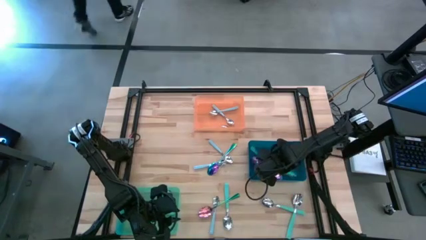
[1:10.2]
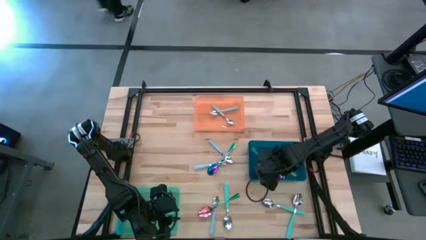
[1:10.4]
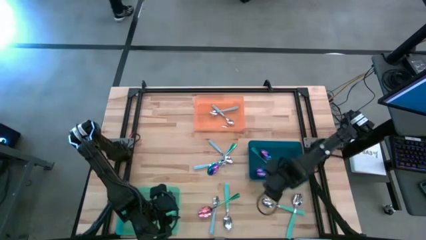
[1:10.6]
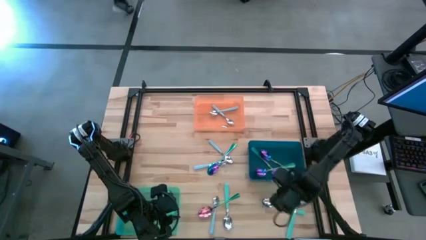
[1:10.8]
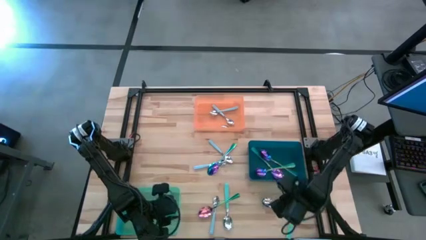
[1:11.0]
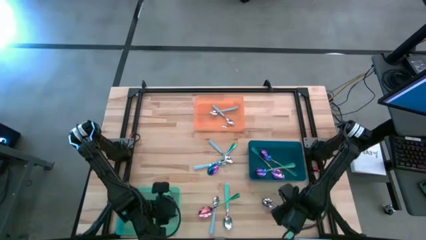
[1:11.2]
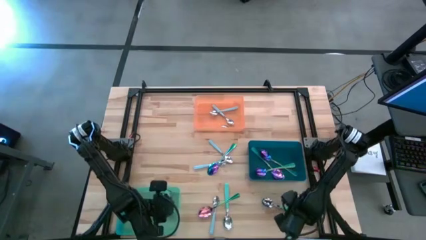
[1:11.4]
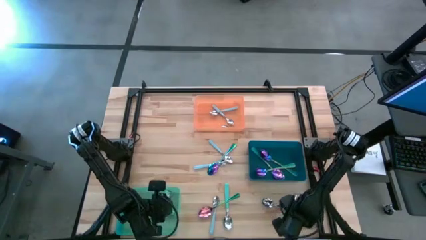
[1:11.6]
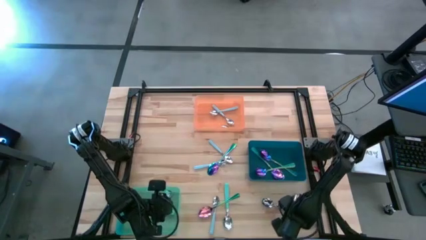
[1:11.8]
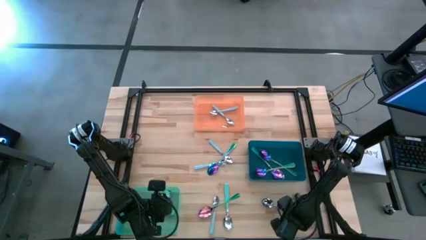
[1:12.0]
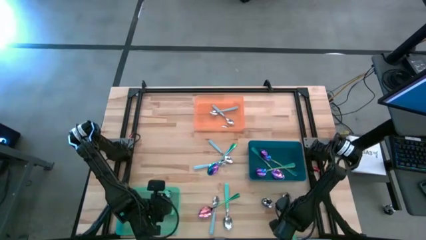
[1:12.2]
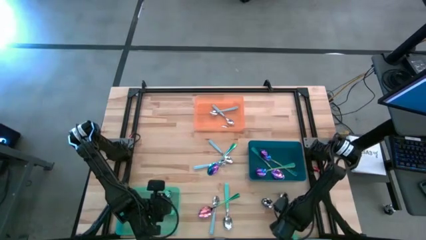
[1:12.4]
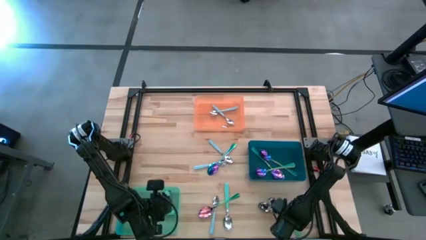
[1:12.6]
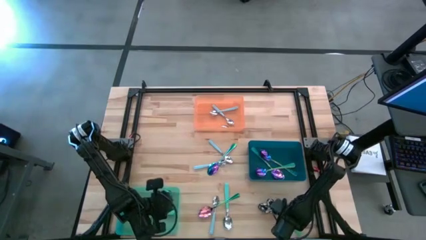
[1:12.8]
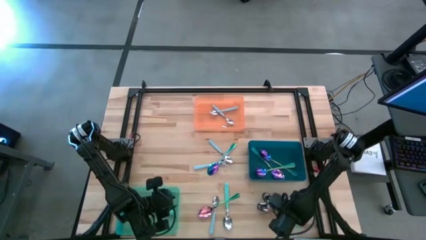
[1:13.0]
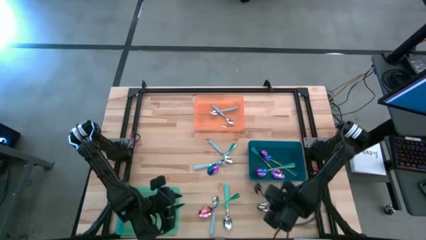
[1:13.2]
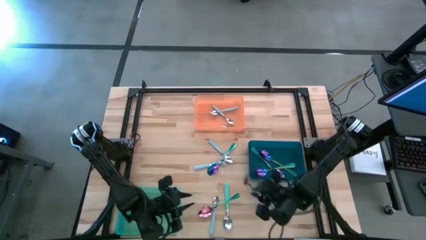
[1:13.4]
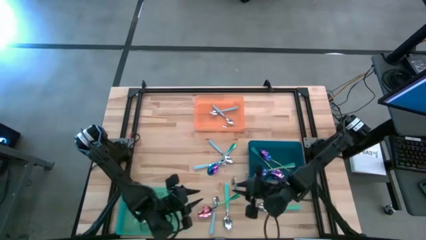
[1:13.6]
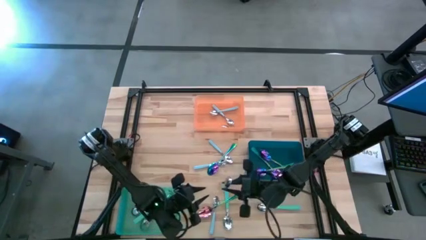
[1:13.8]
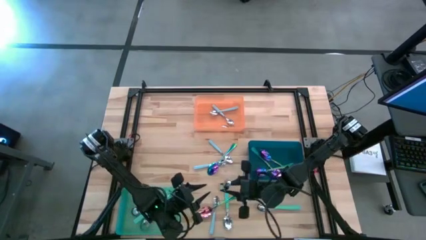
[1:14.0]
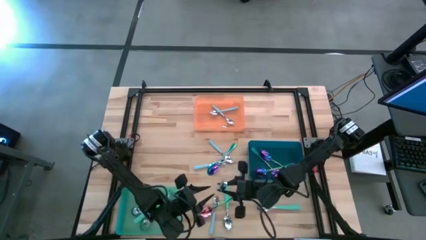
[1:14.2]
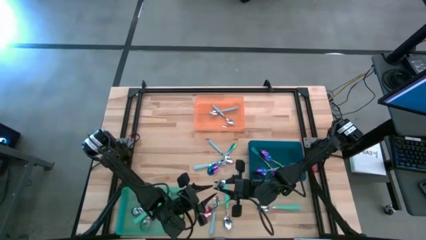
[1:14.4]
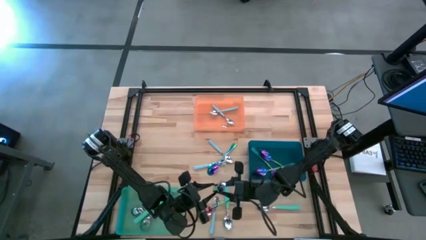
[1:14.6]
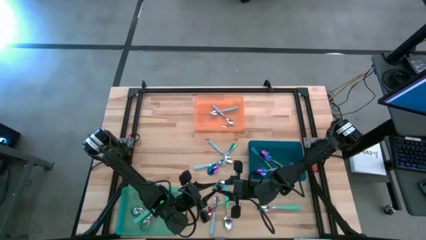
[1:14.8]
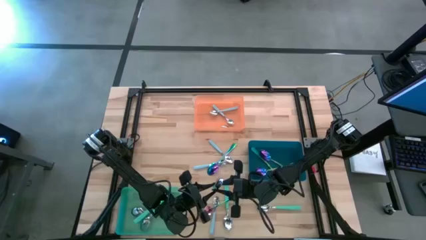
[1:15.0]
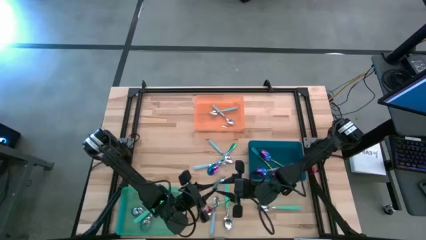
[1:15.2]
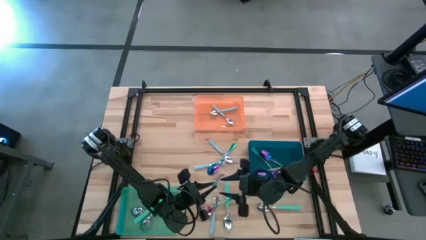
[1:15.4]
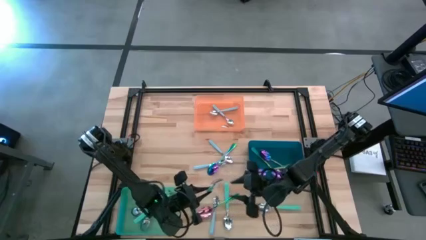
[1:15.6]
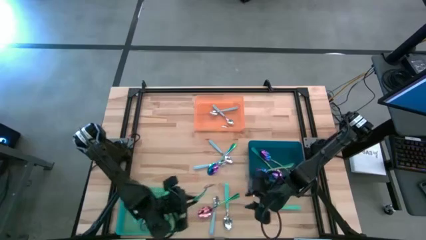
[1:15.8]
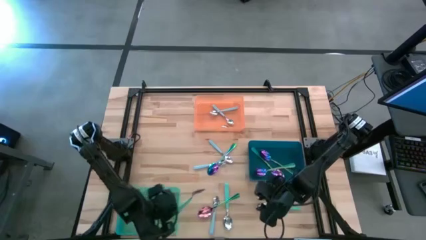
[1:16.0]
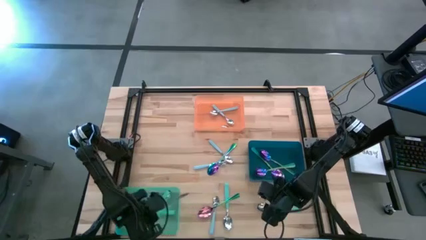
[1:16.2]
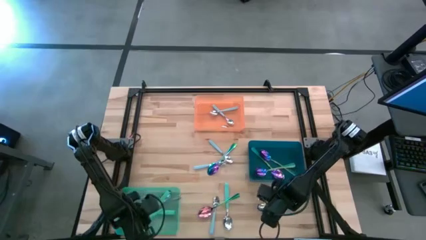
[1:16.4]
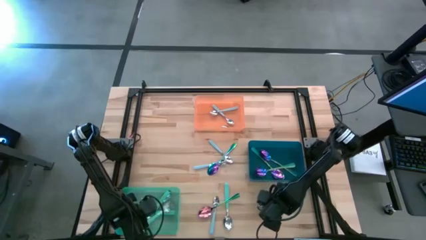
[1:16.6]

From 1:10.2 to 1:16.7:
Task: Sort silverware by color (type)
Put the green spoon into the green bin

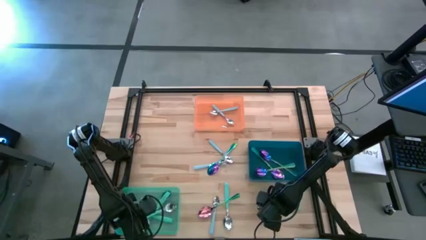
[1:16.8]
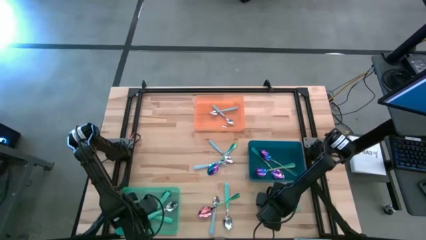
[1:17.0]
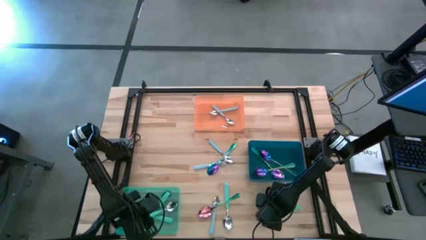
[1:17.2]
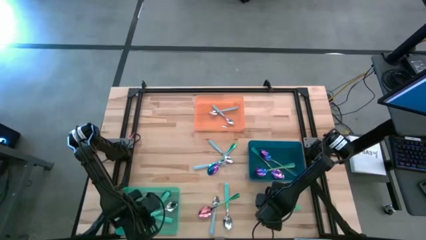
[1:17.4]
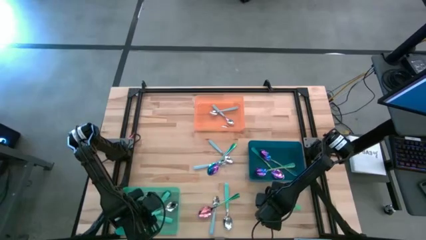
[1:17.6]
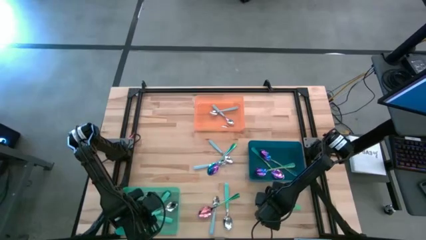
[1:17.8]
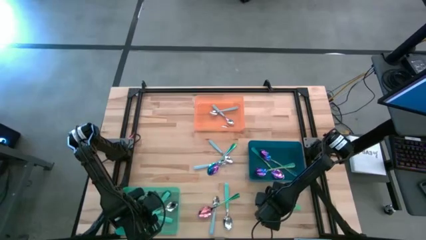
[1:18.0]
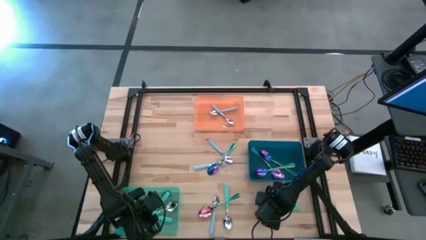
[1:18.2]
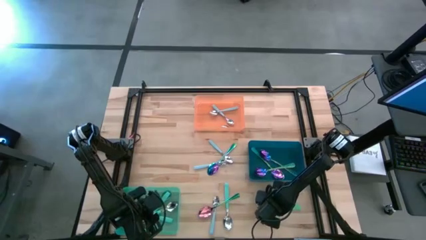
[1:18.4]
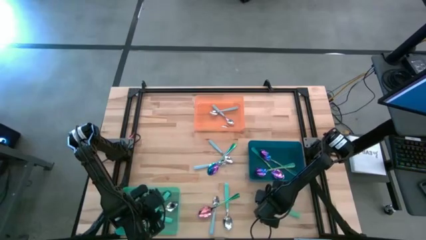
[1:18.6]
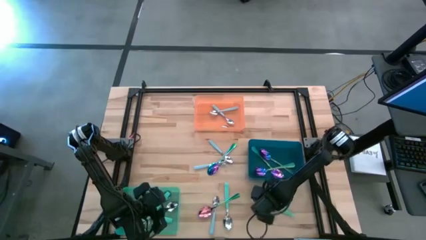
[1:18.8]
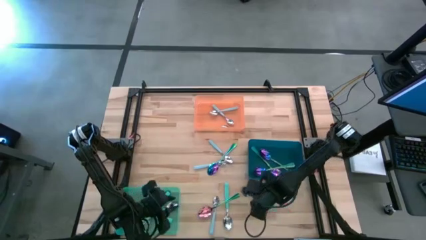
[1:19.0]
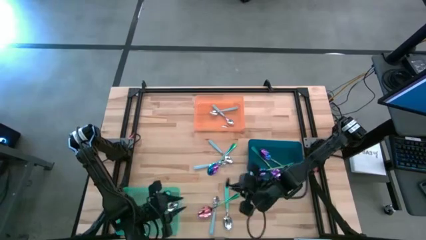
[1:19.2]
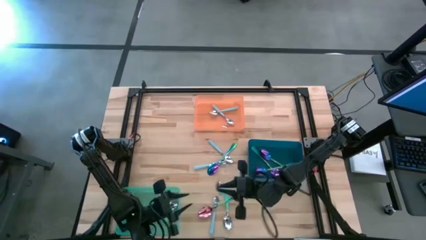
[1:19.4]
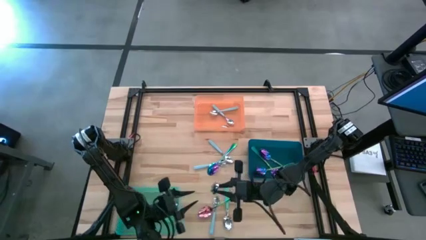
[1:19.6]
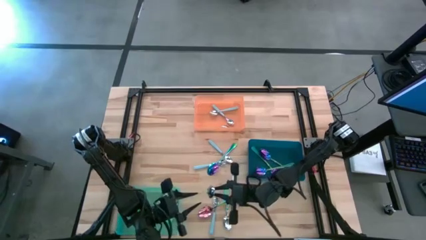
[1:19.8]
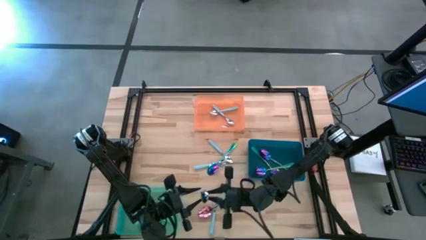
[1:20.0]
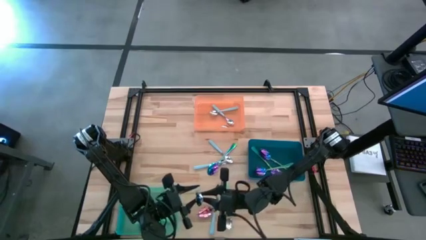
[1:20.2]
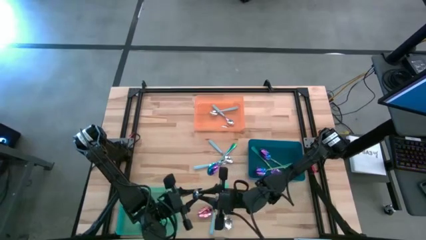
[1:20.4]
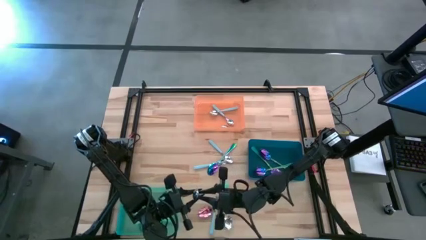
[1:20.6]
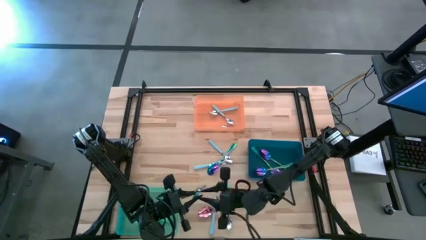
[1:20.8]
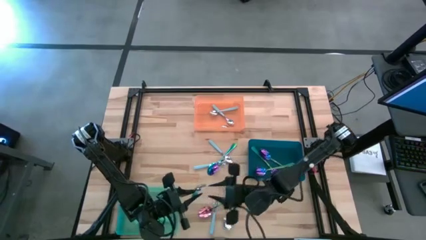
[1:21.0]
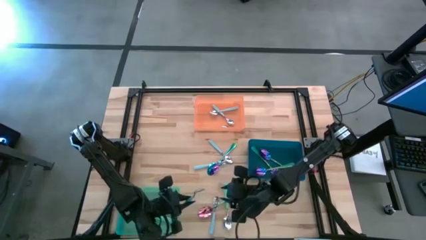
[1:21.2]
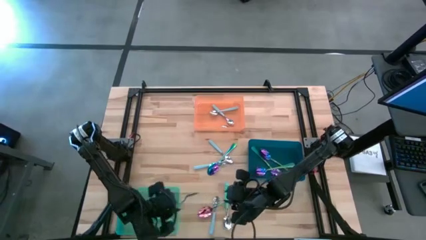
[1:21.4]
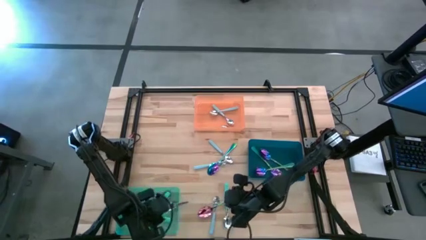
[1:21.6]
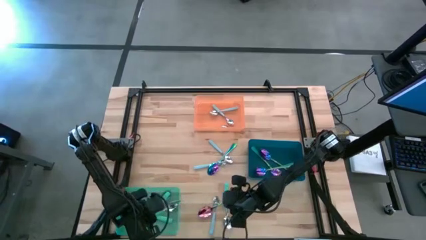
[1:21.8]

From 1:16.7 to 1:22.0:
Put the green spoon into the green bin

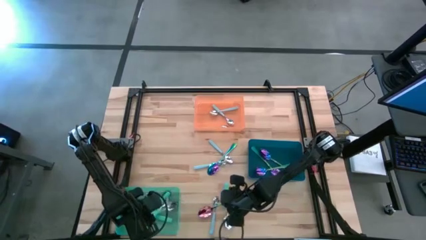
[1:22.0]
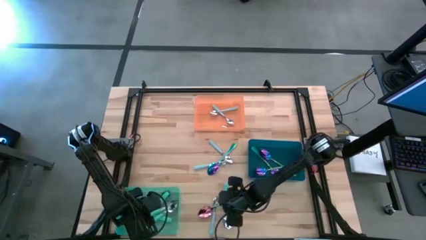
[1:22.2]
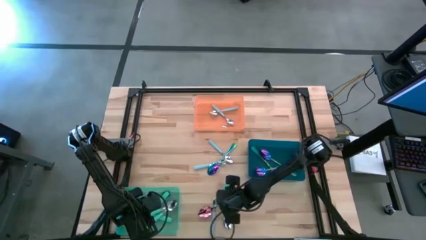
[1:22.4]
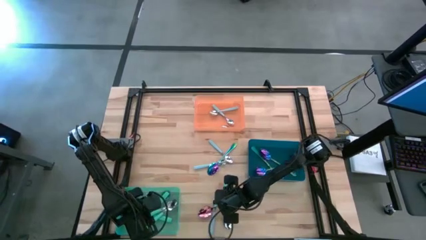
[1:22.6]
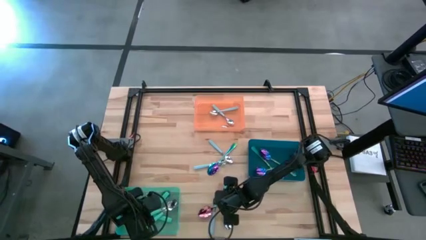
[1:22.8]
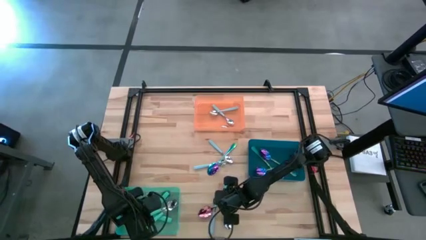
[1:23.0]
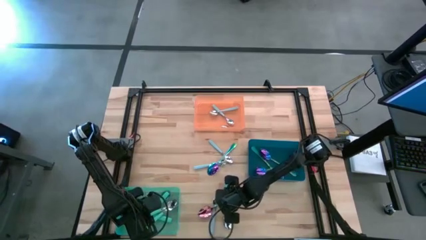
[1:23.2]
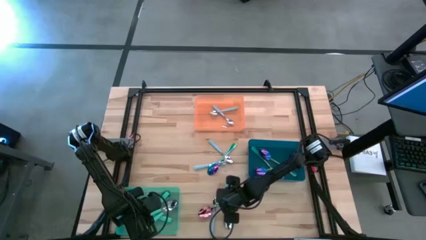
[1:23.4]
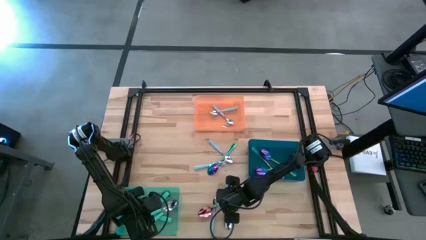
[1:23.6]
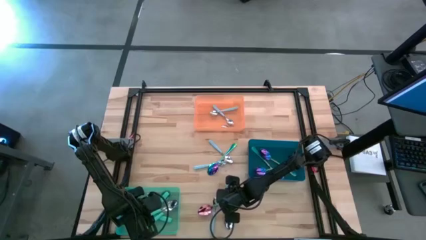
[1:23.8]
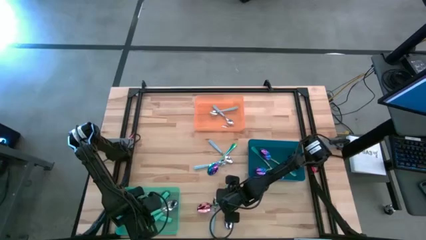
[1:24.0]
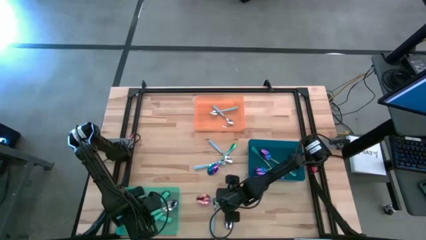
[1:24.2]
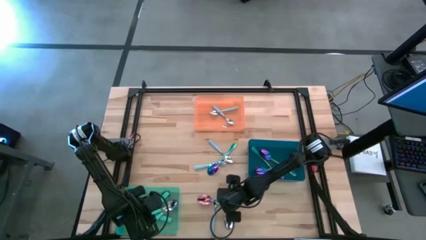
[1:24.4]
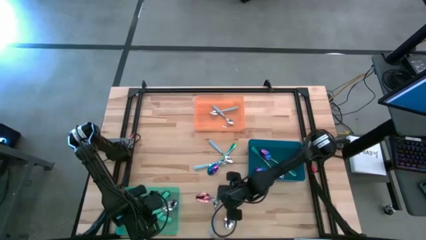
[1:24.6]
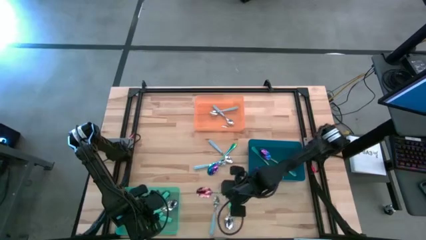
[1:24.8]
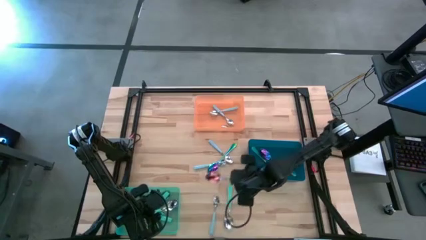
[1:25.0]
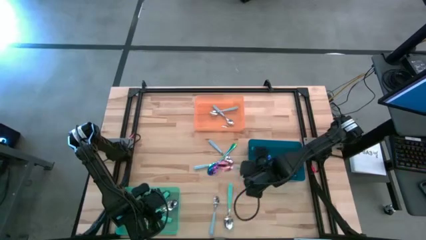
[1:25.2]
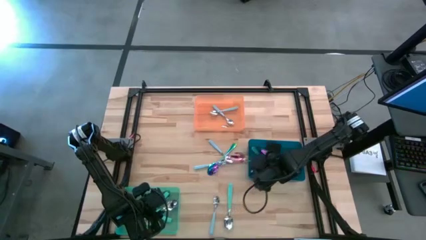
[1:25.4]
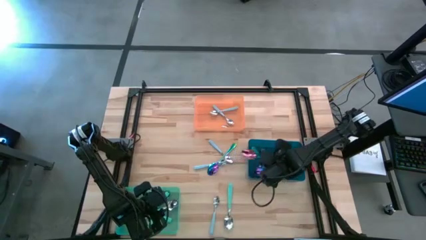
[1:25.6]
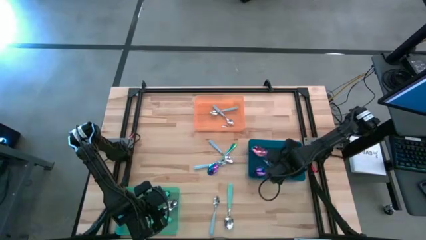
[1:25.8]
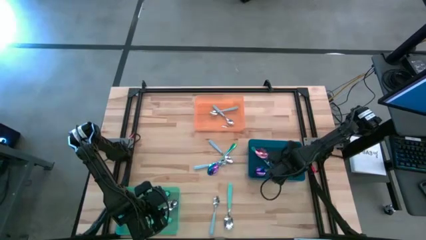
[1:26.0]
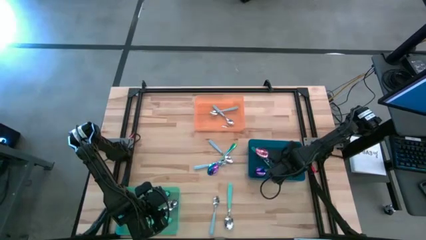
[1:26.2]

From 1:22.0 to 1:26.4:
Put the purple spoon into the blue bin
